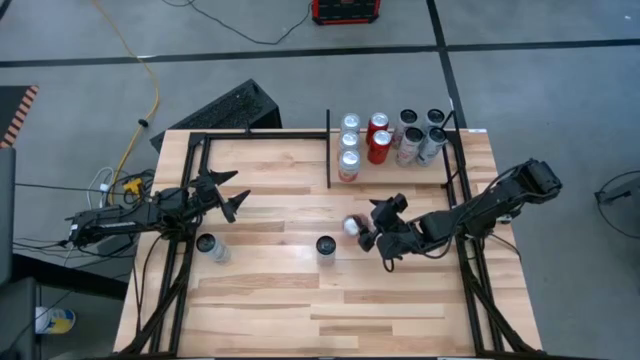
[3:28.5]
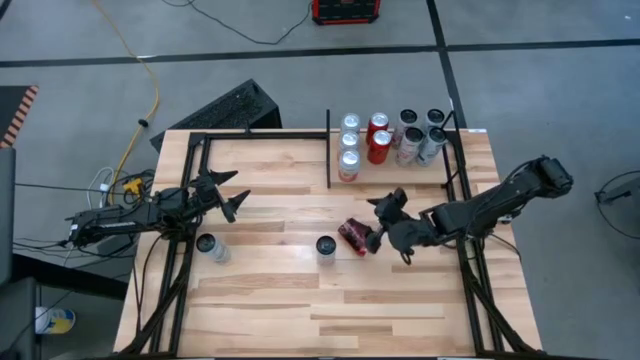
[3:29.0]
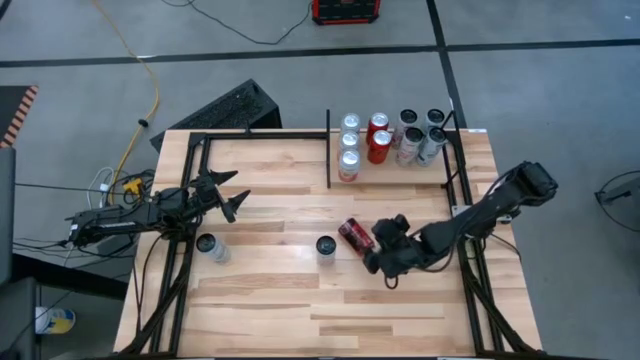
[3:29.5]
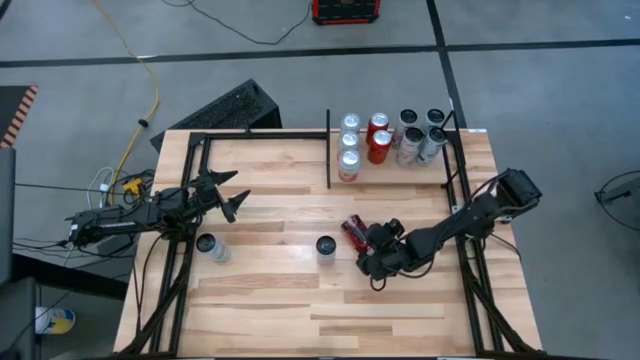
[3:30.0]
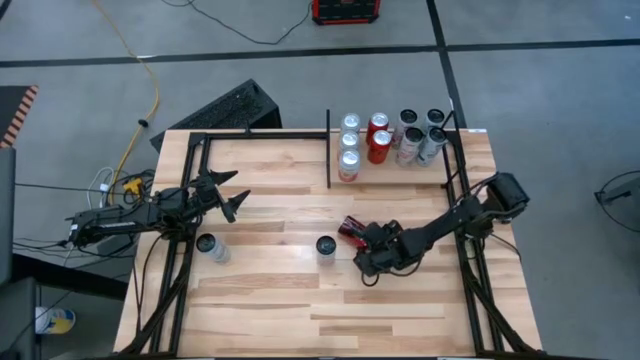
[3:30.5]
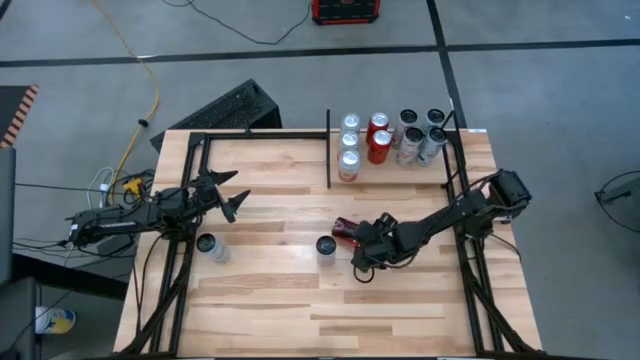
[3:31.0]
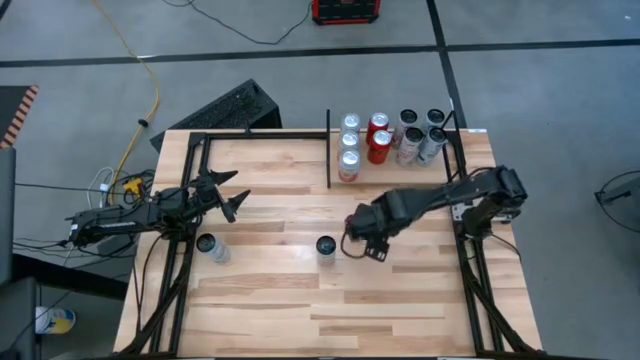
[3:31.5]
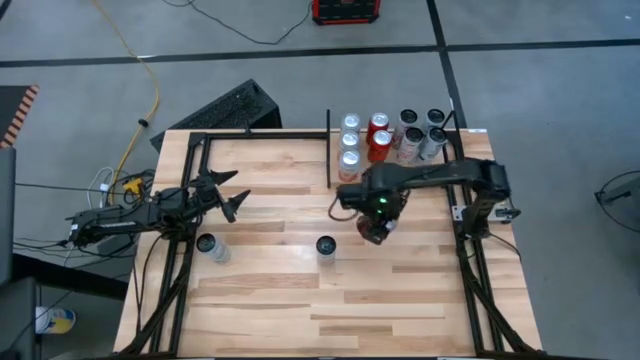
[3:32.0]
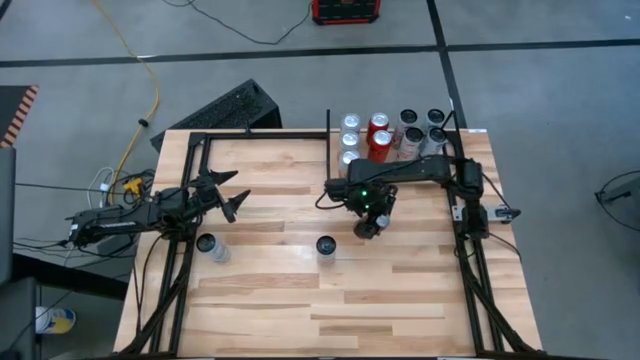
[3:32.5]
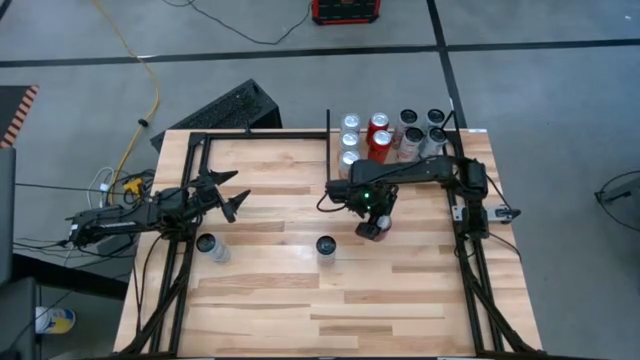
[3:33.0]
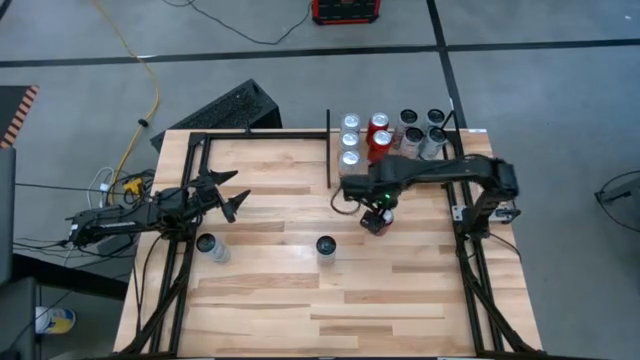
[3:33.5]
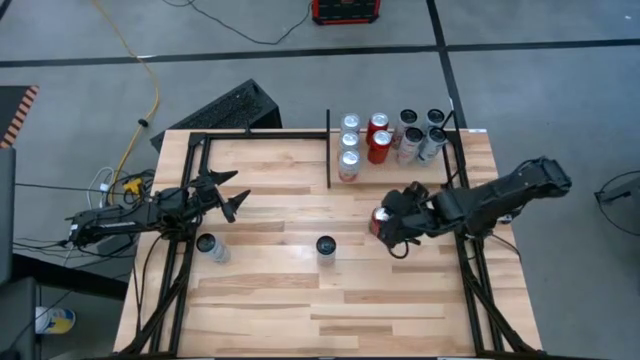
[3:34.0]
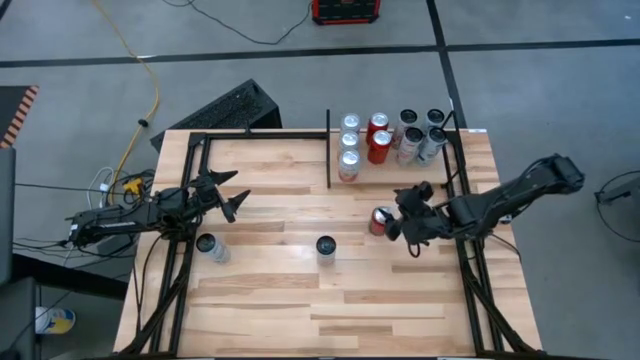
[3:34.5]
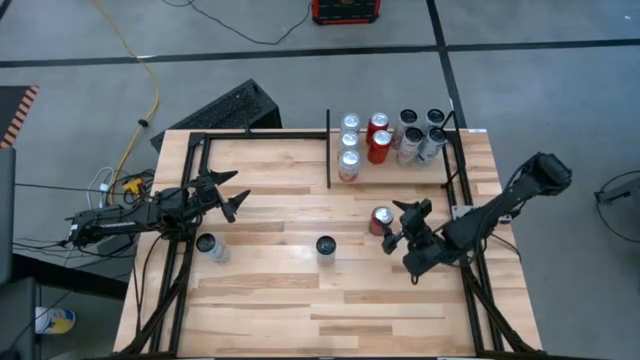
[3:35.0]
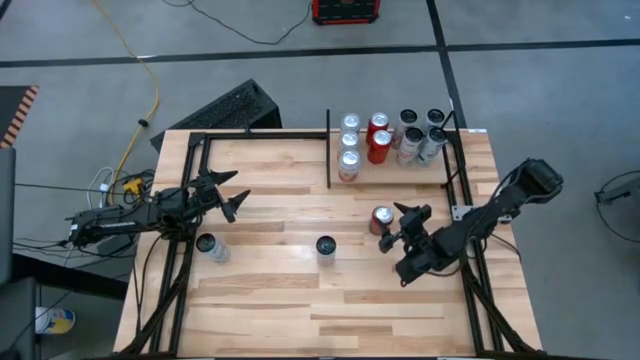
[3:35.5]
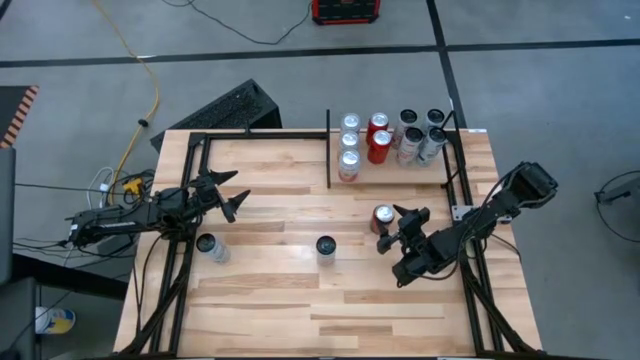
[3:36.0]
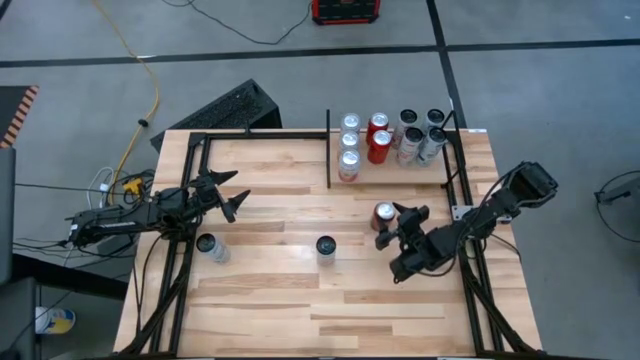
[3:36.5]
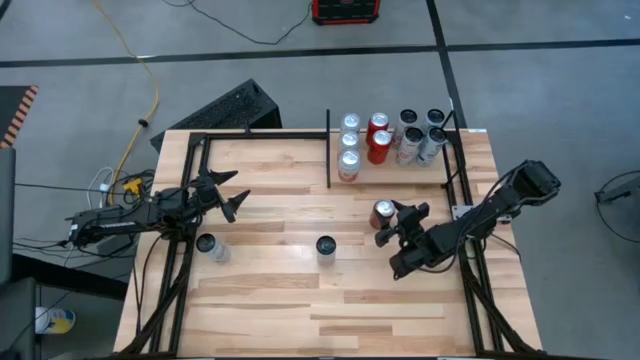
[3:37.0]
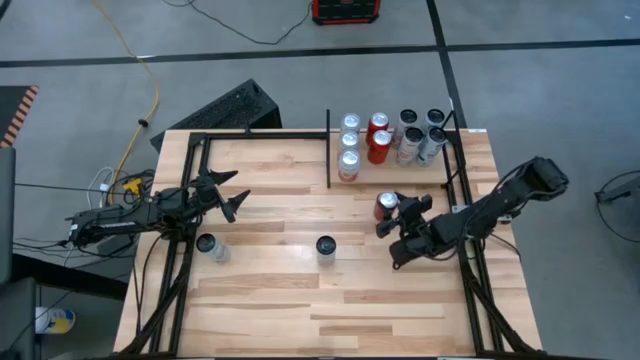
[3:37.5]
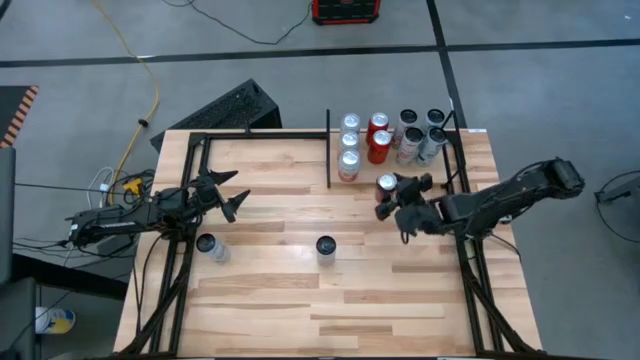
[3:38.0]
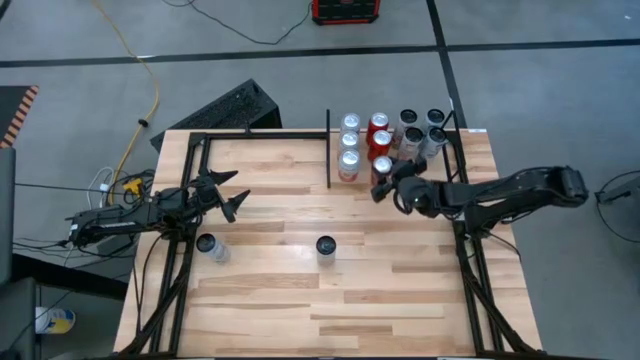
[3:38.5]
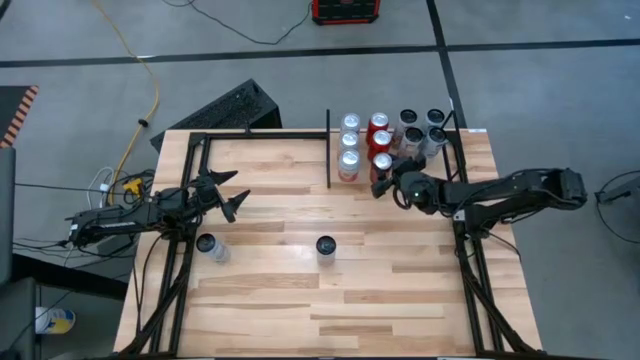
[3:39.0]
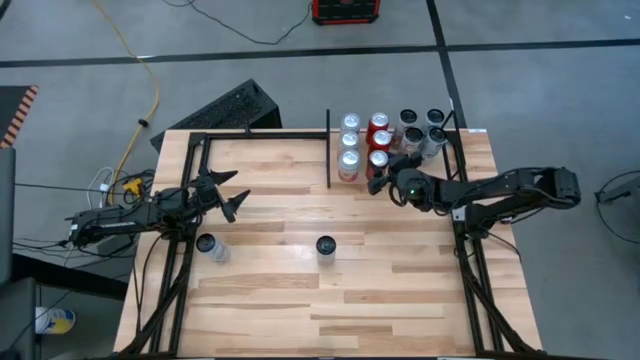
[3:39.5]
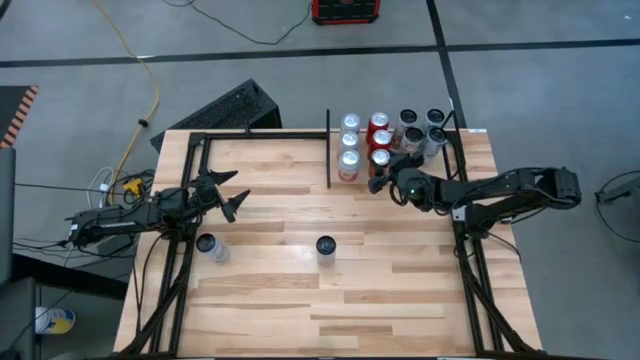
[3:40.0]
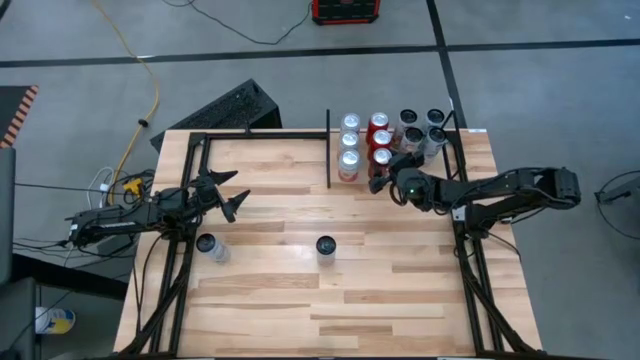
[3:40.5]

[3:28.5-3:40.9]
Task: Place canned beverage on shelf
Put the red soda can on the shelf

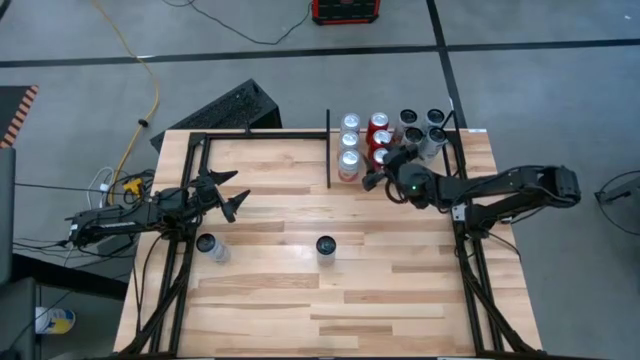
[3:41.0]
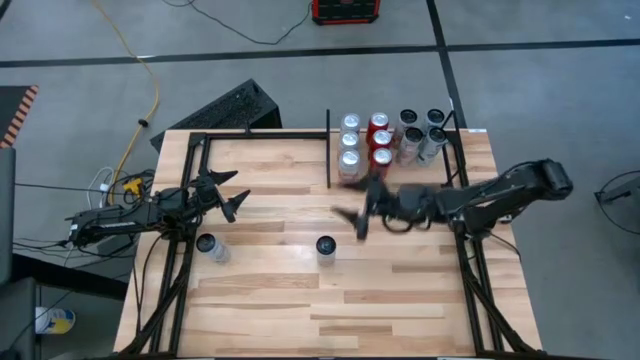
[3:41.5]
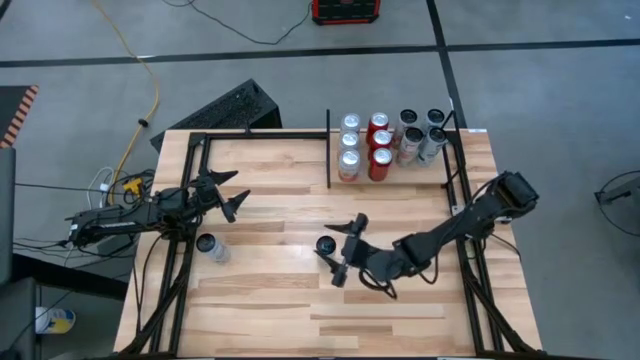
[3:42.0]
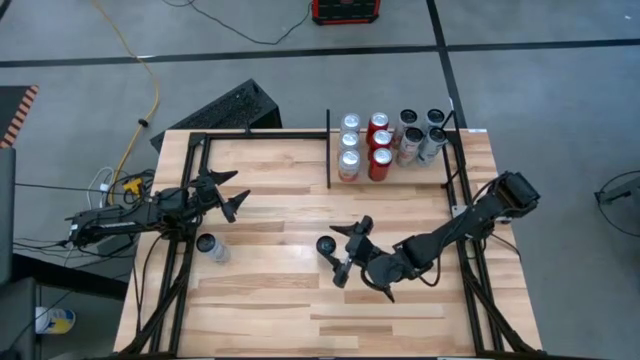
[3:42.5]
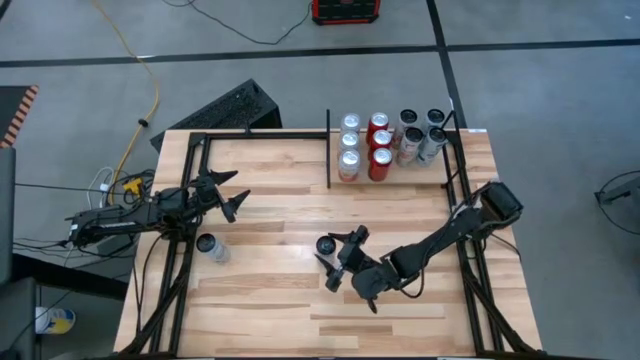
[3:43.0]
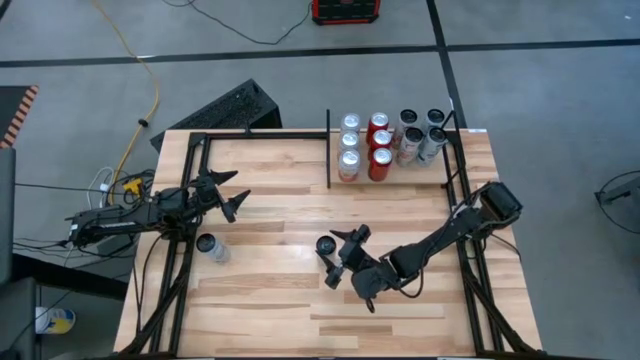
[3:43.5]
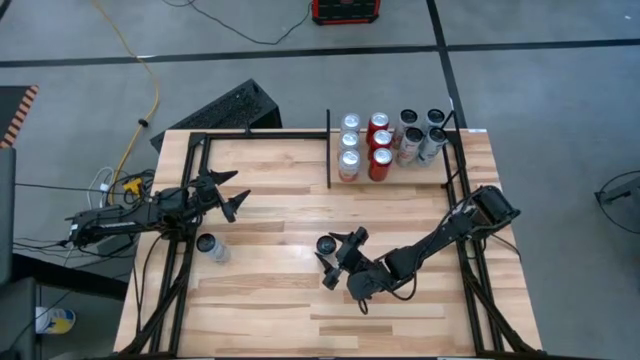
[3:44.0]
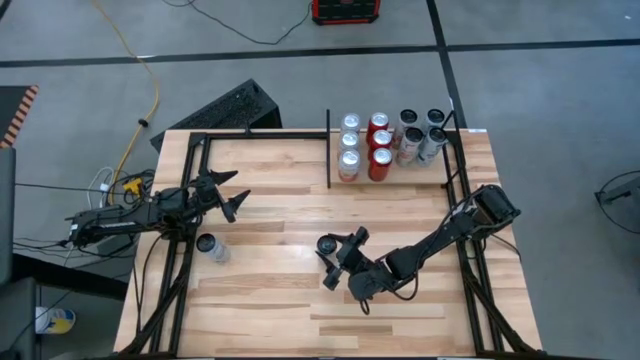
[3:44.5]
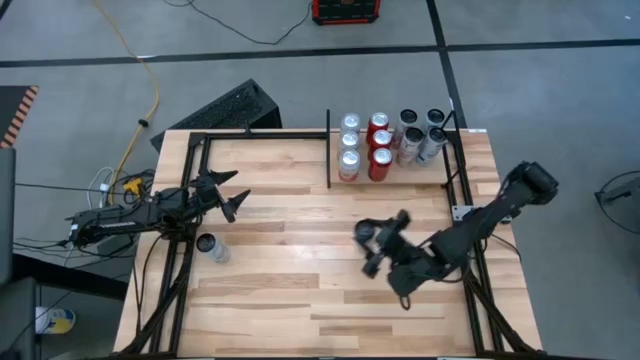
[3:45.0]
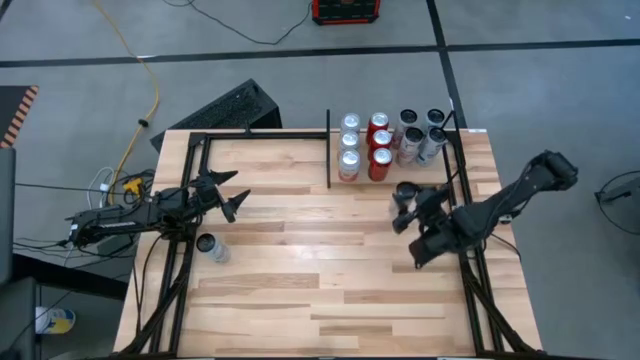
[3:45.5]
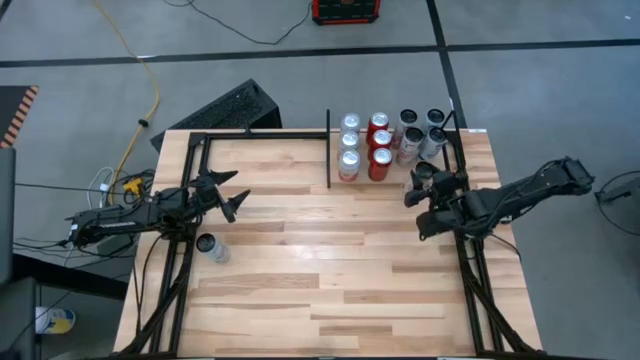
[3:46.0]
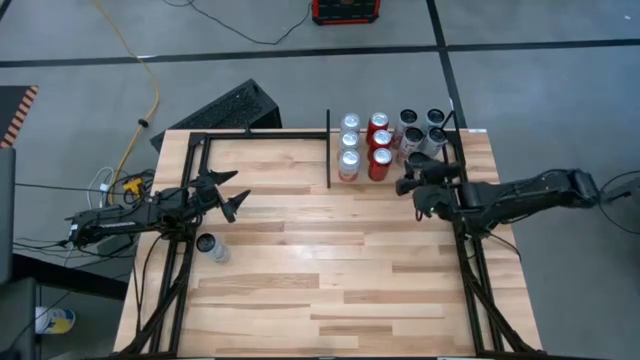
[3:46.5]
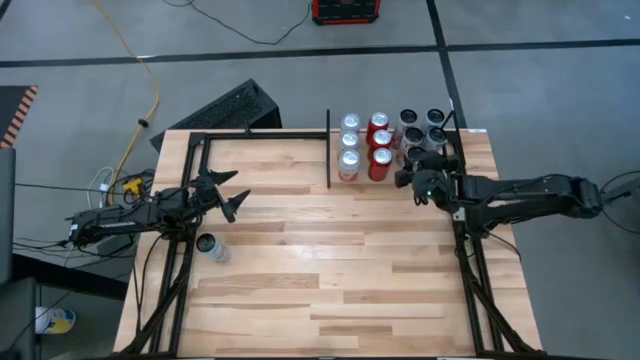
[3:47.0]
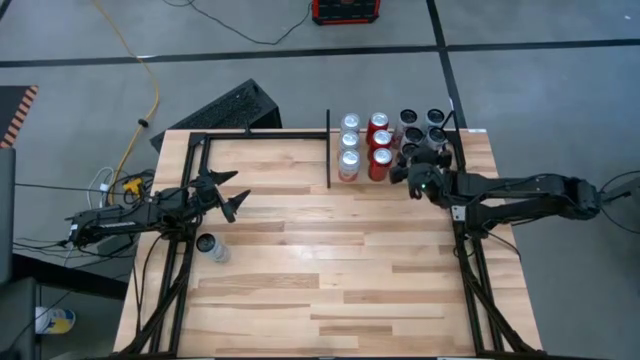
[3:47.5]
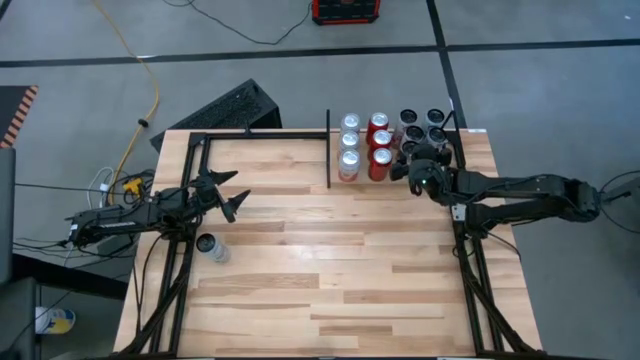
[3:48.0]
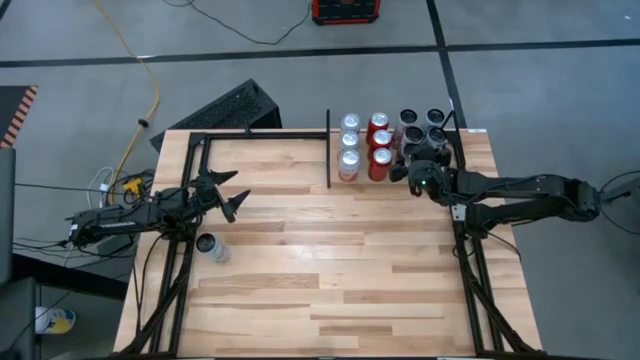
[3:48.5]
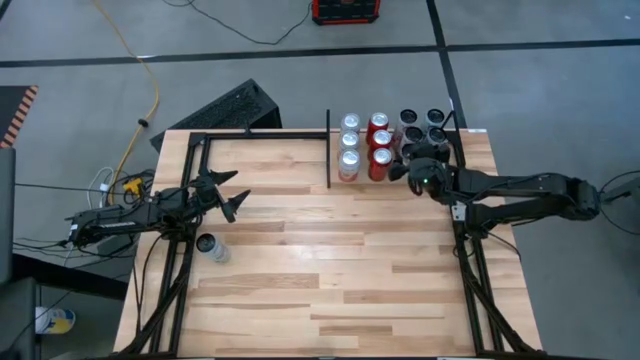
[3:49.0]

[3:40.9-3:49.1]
Put the black pink soda can on the shelf

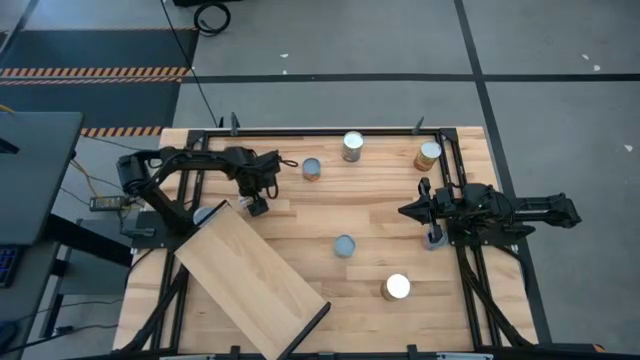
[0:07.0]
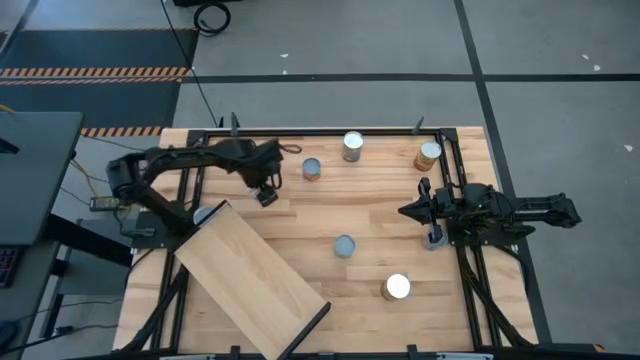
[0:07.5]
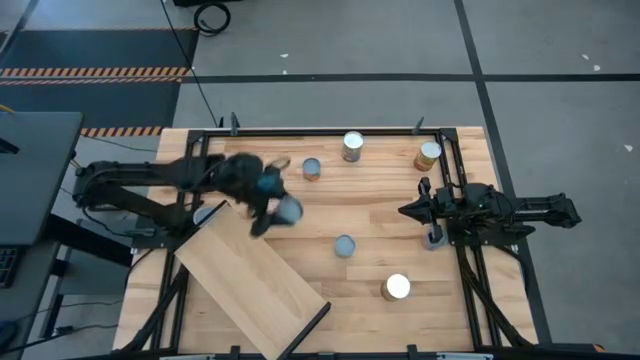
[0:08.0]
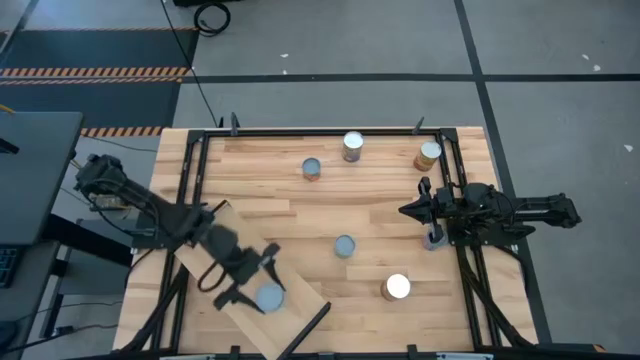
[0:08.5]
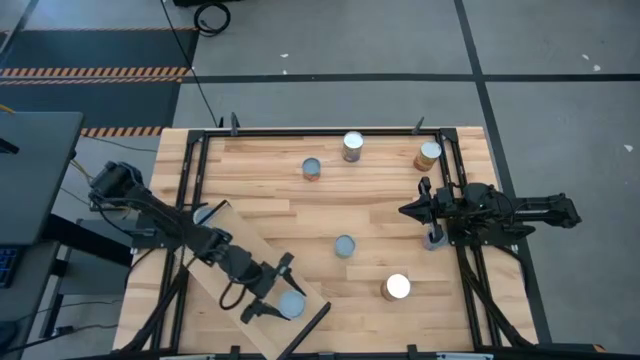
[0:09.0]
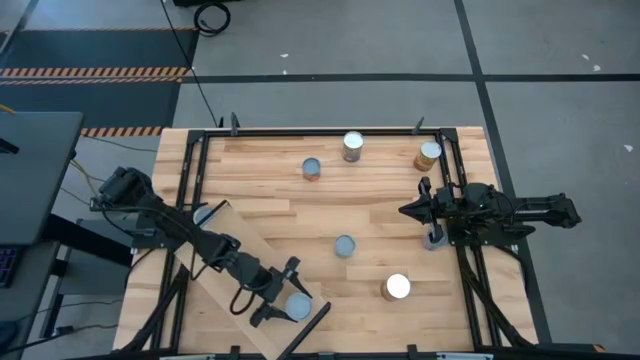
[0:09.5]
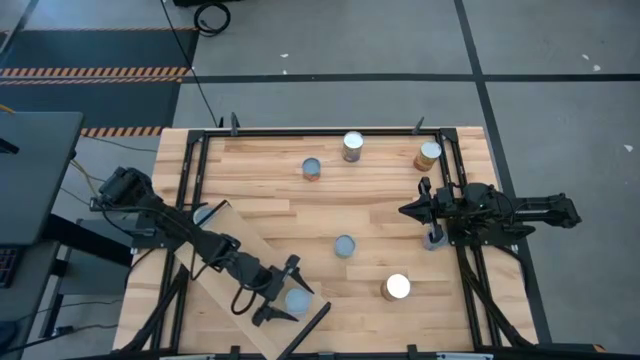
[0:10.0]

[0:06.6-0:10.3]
Task: Pick and place cans onto a shelf
Put the canned carrots on the shelf
